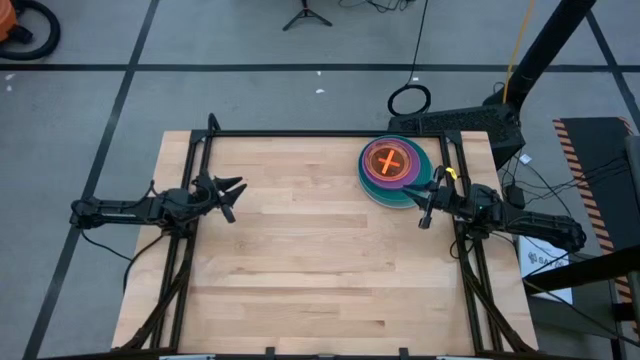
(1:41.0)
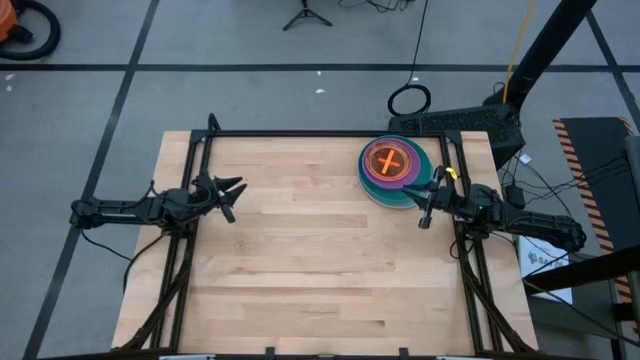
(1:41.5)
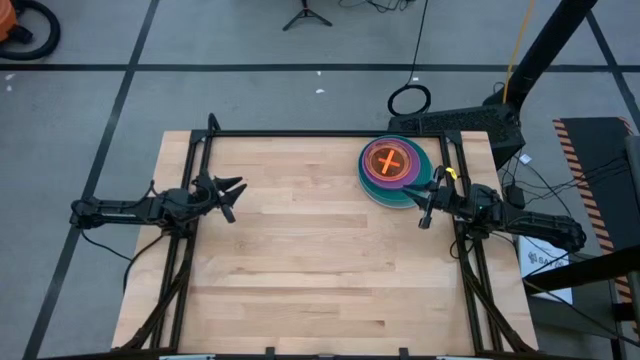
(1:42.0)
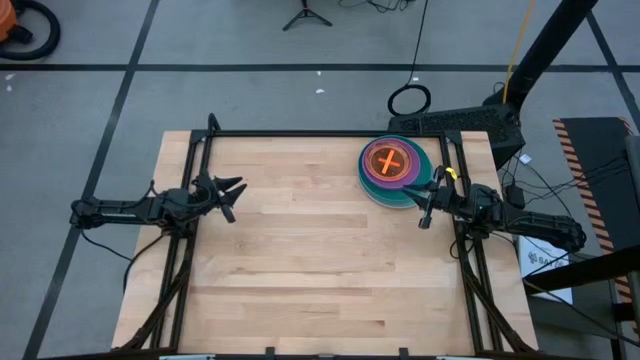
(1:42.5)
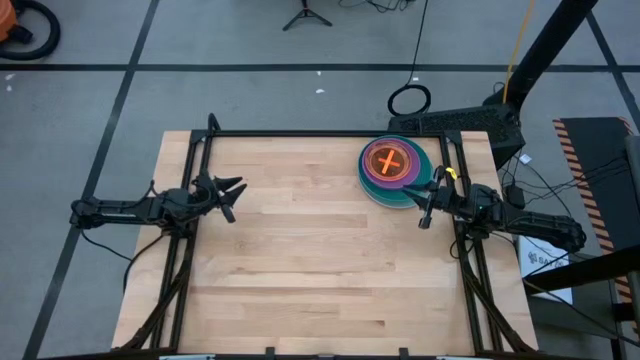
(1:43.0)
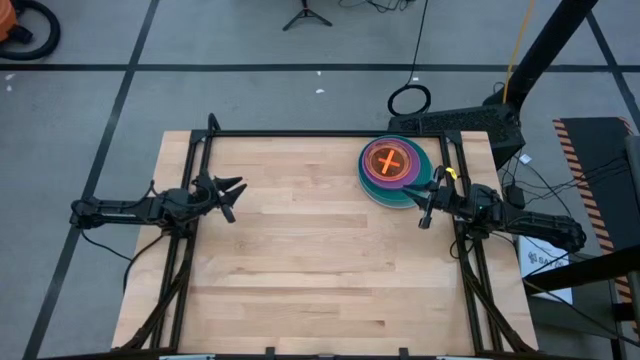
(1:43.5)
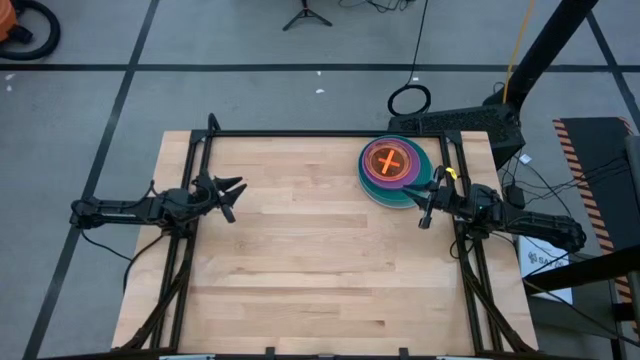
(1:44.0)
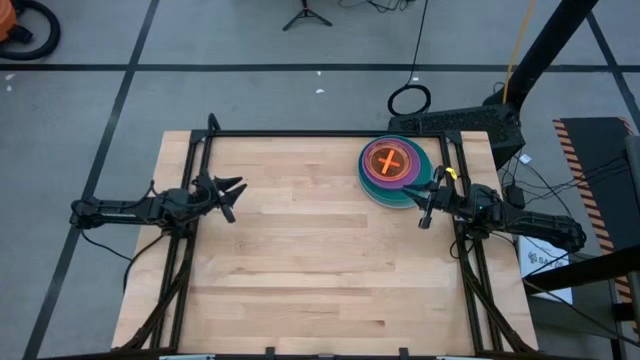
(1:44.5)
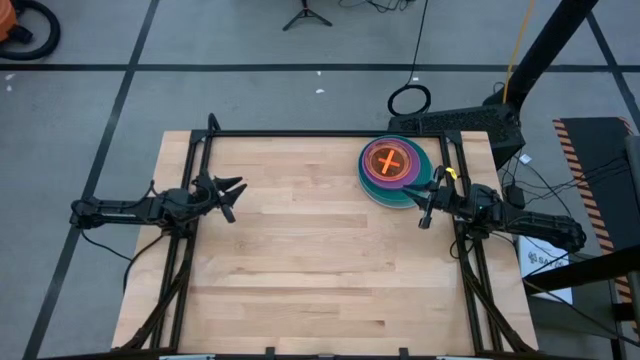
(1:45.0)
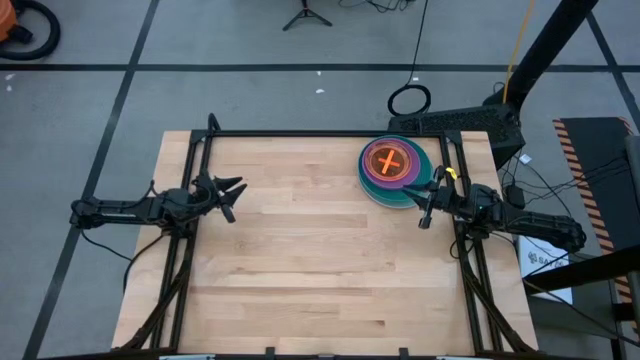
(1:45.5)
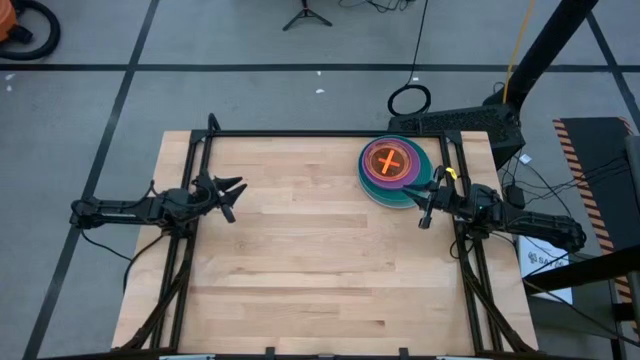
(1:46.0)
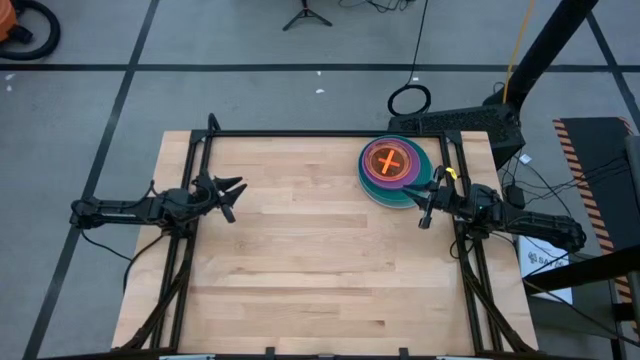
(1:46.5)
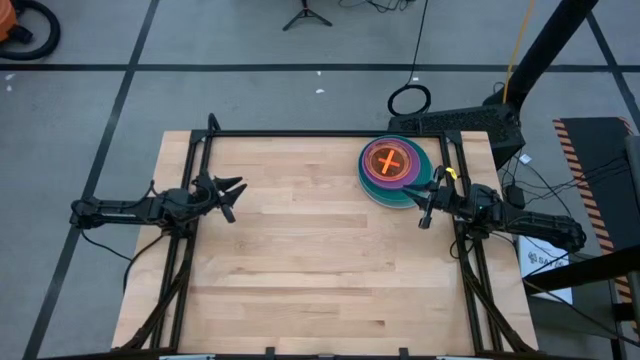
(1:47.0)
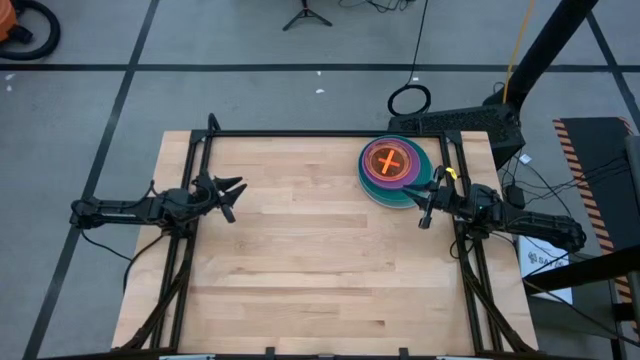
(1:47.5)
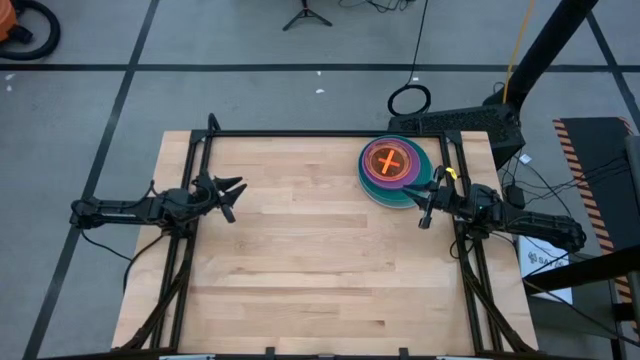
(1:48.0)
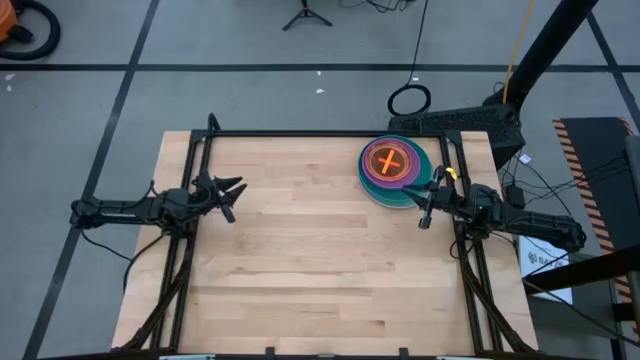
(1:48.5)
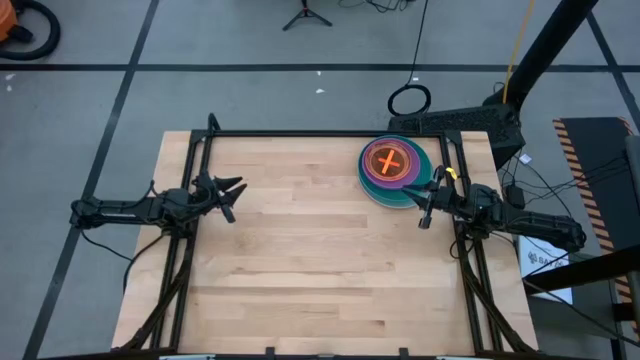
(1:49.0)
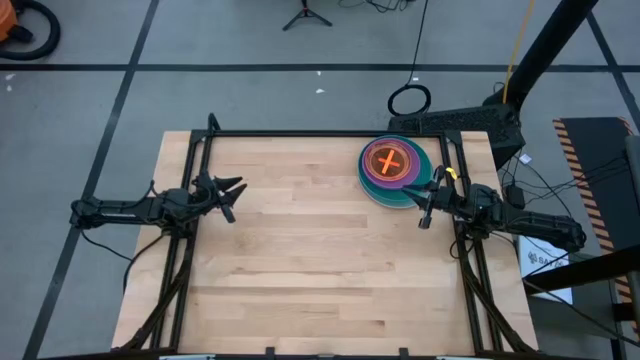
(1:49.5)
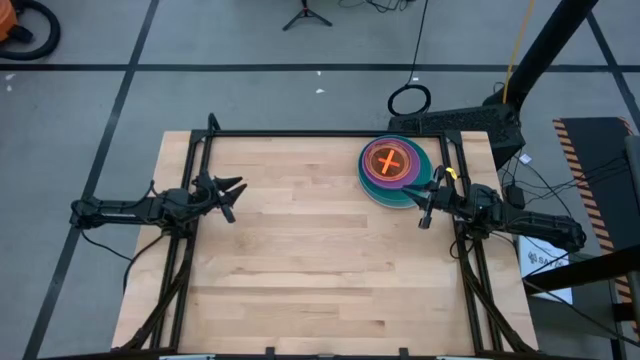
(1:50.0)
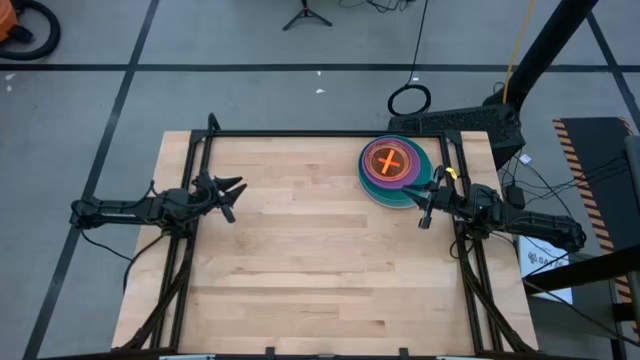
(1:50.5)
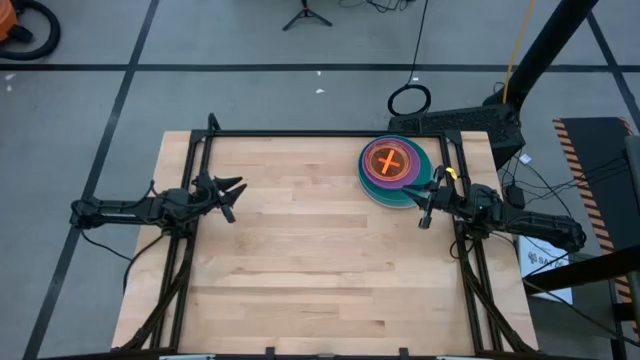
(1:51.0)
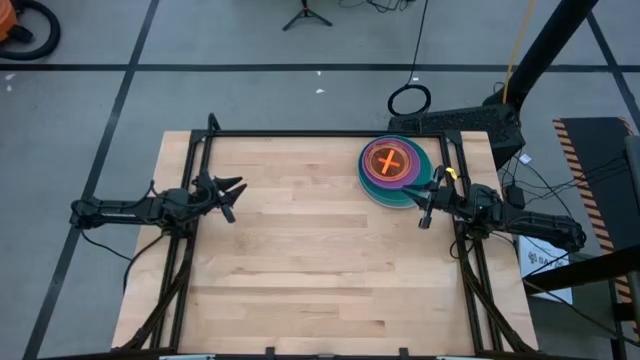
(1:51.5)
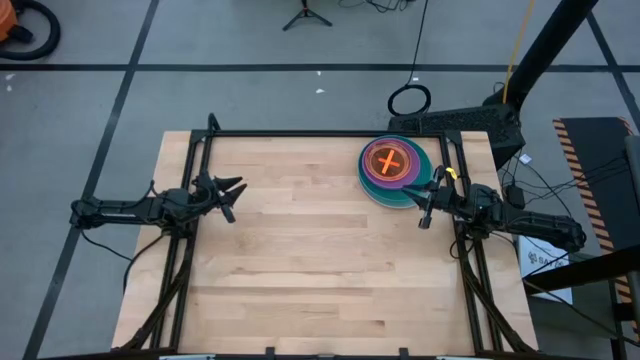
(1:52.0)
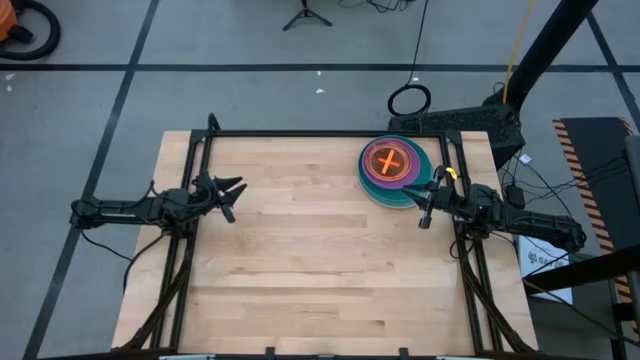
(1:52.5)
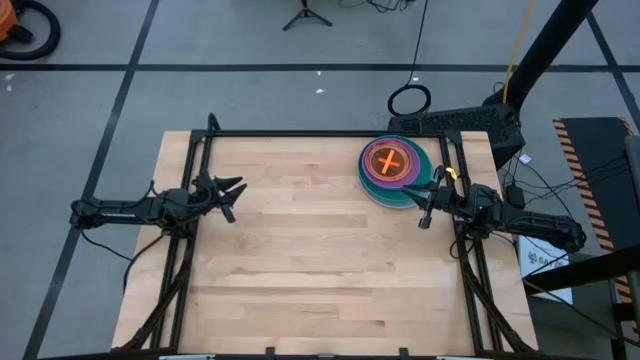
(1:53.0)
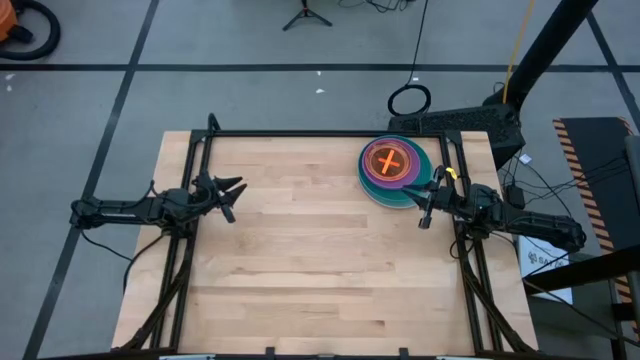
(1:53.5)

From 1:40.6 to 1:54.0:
Task: Stack plastic plates
Return to Home Position

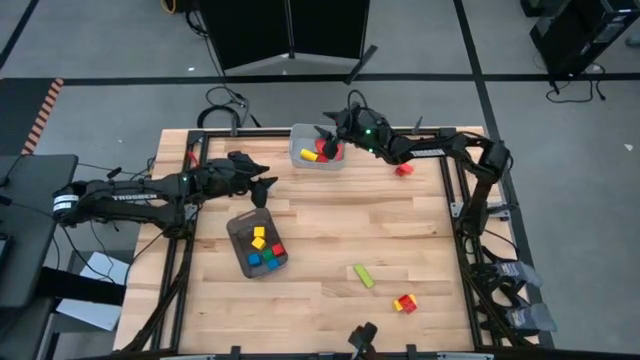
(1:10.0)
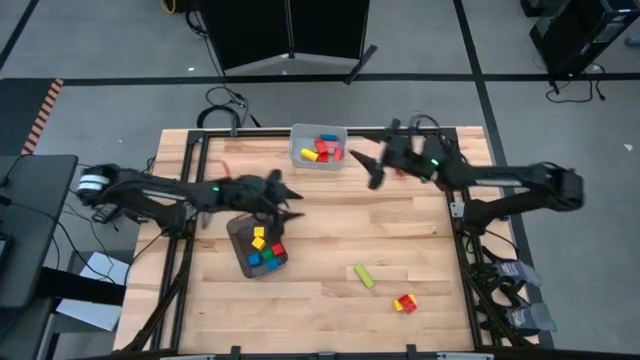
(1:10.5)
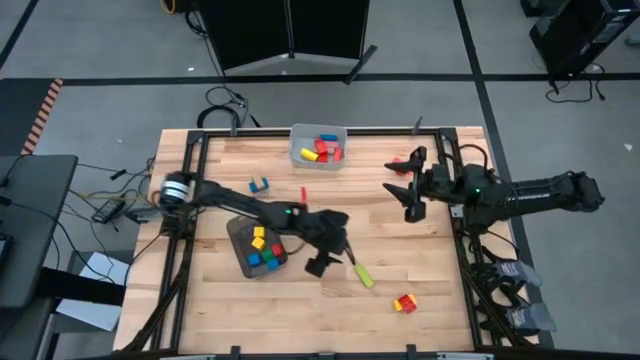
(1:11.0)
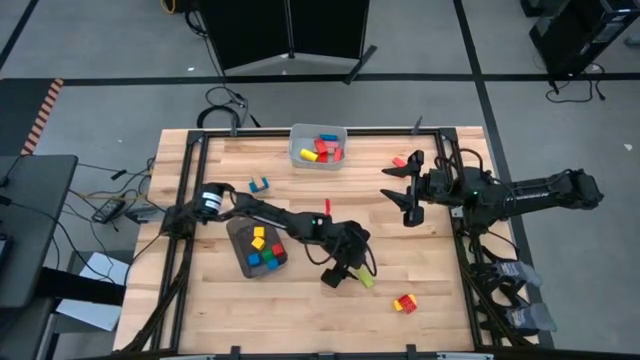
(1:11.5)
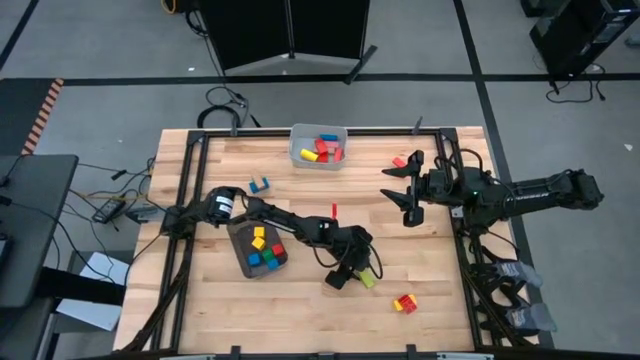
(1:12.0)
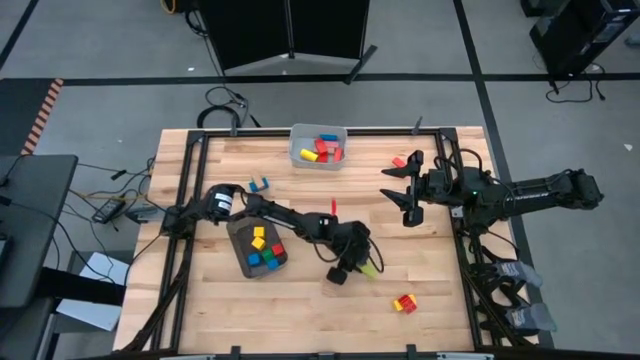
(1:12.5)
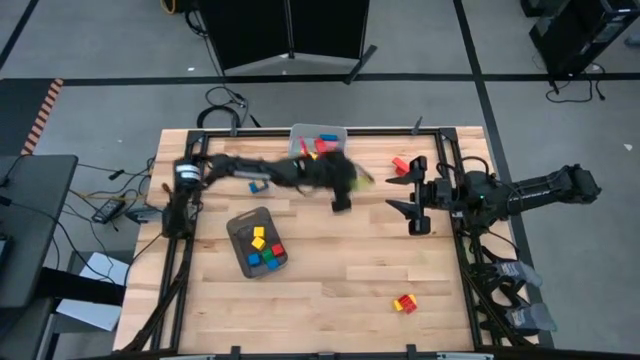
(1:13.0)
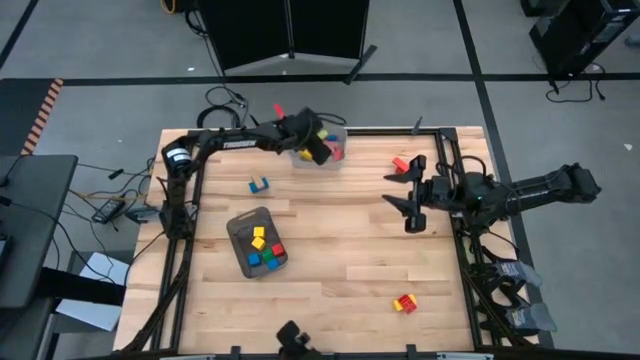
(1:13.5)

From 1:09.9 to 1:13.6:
Task: Sort blocks by size
Put the green rectangular block into the gray bin

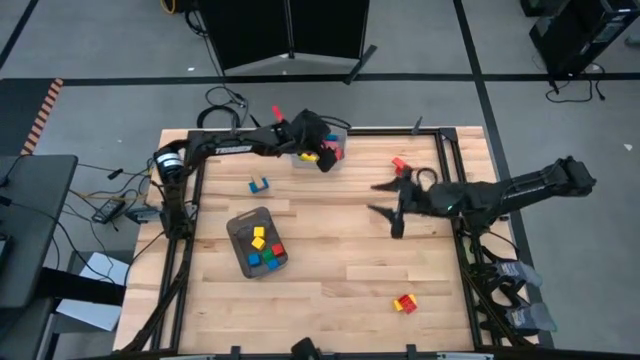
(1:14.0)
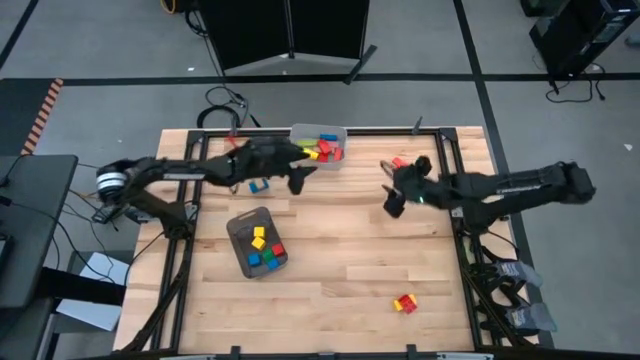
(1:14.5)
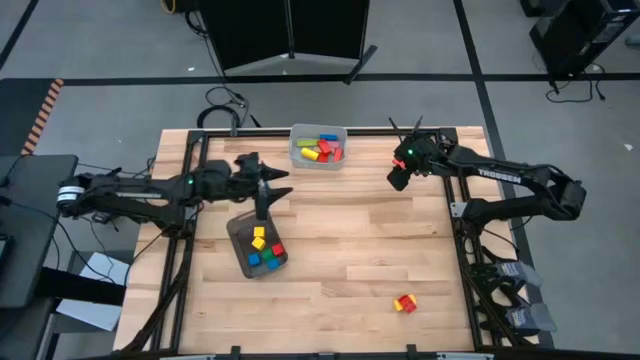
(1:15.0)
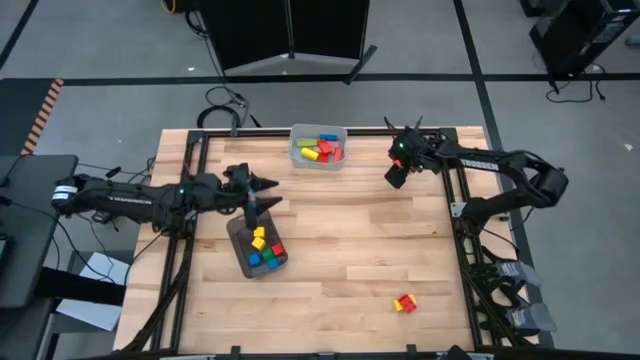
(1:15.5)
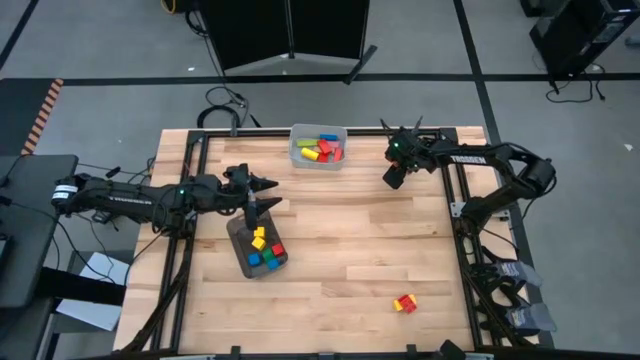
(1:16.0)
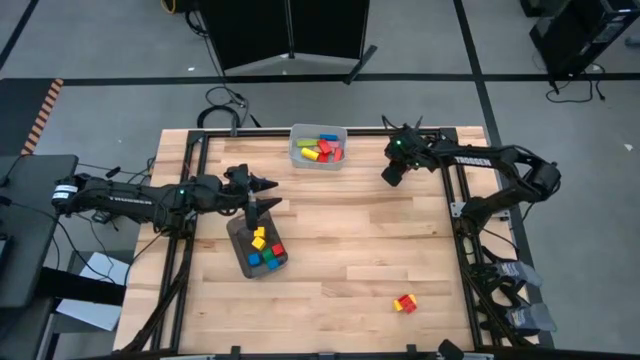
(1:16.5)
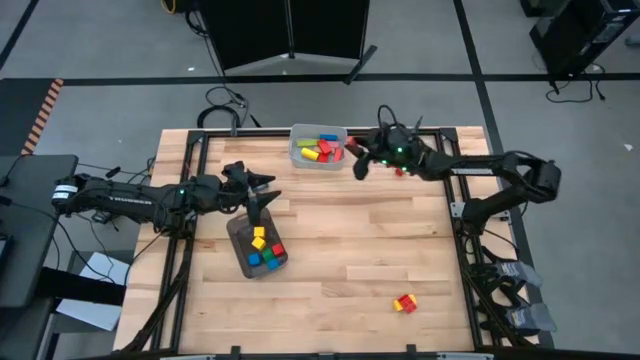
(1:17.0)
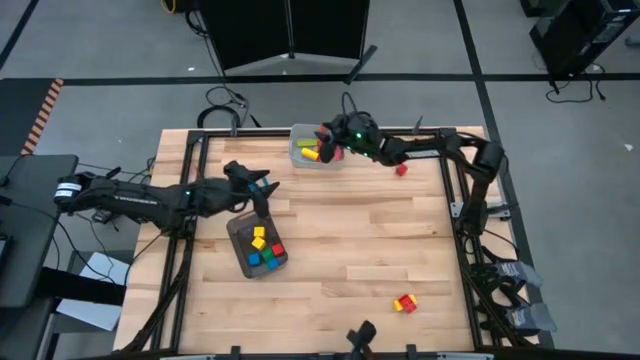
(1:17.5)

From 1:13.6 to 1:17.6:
Put the orange rectangular block into the gray bin
